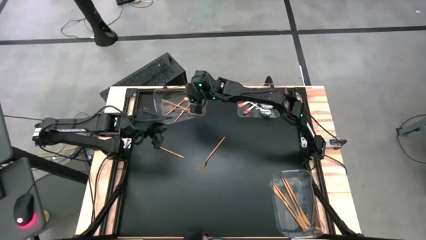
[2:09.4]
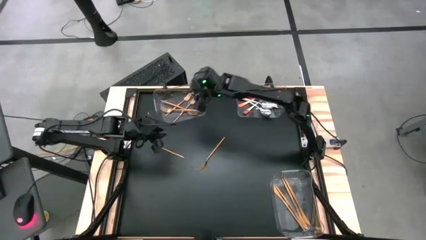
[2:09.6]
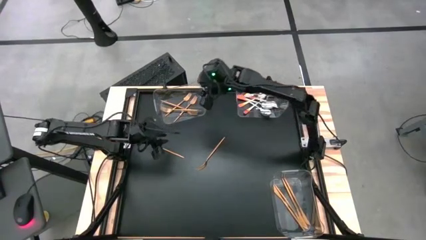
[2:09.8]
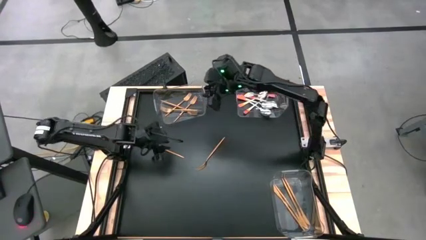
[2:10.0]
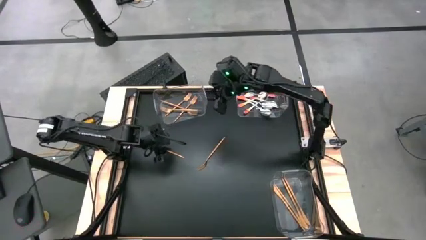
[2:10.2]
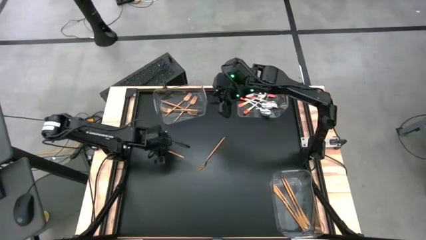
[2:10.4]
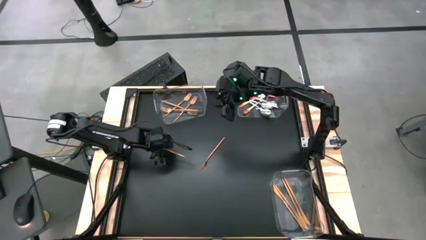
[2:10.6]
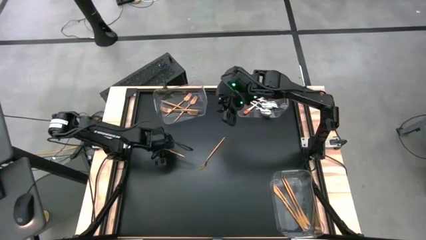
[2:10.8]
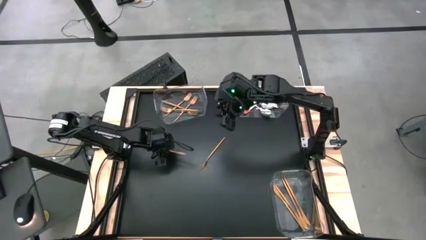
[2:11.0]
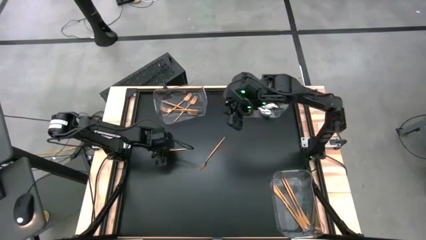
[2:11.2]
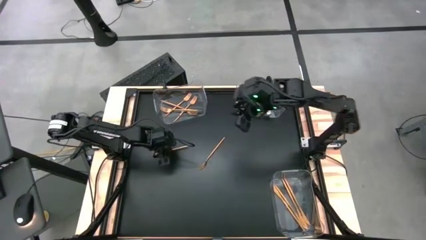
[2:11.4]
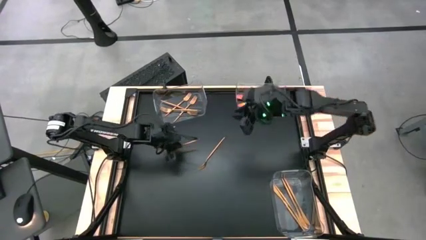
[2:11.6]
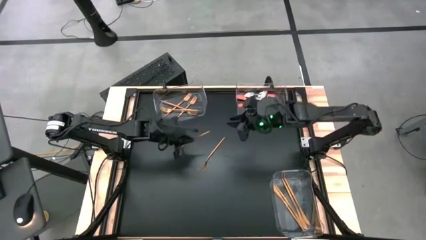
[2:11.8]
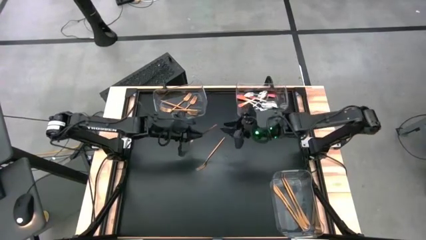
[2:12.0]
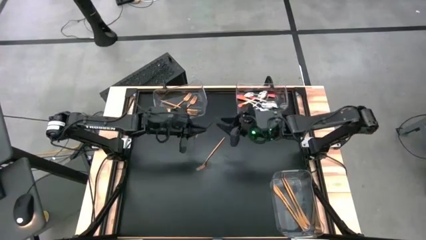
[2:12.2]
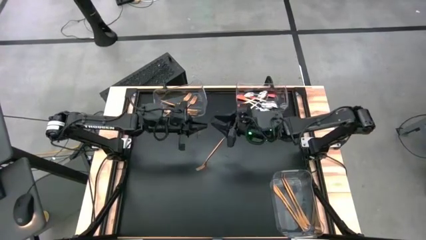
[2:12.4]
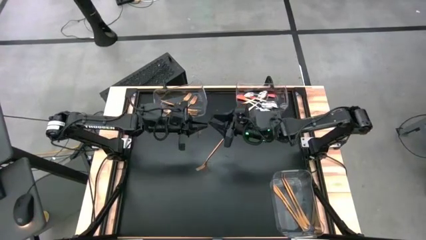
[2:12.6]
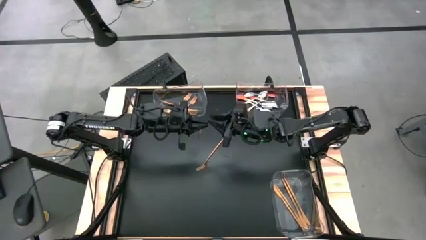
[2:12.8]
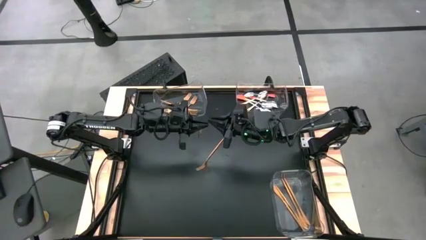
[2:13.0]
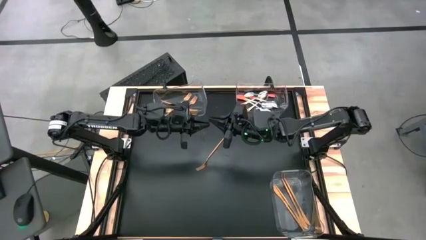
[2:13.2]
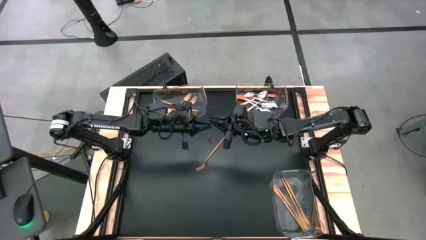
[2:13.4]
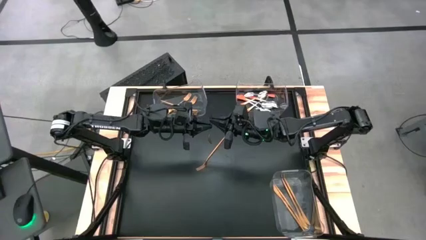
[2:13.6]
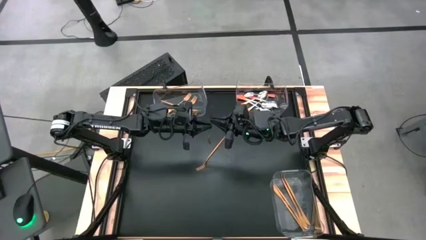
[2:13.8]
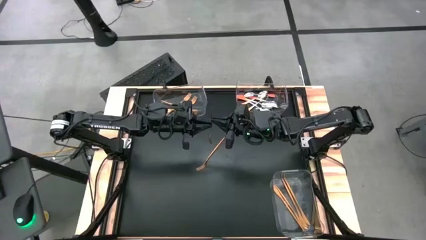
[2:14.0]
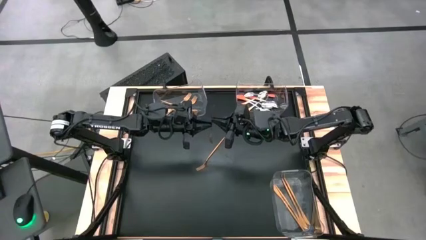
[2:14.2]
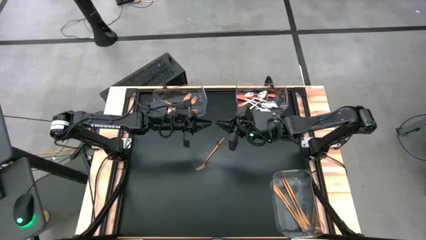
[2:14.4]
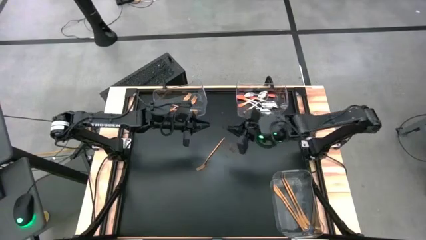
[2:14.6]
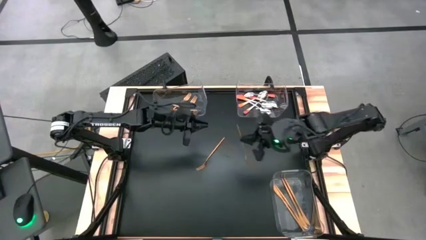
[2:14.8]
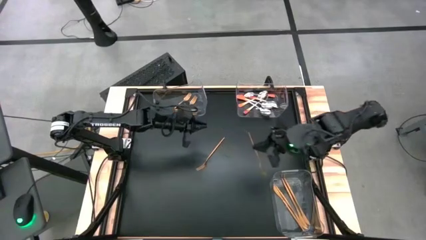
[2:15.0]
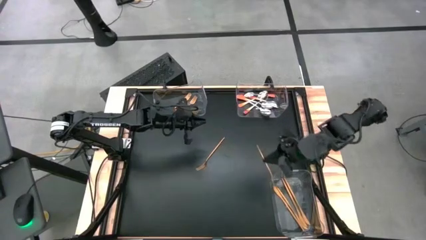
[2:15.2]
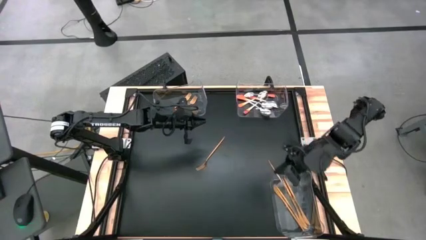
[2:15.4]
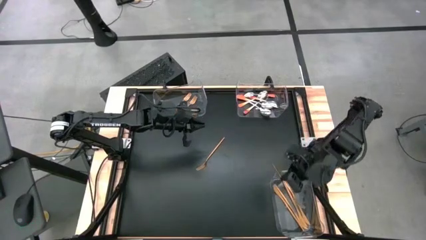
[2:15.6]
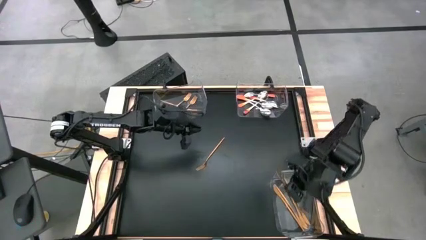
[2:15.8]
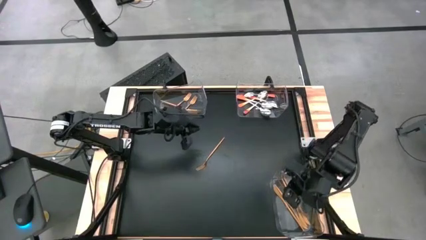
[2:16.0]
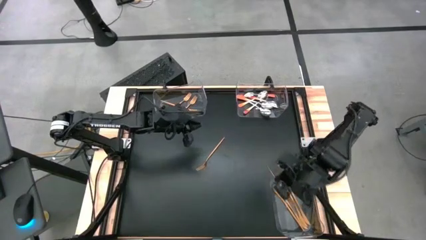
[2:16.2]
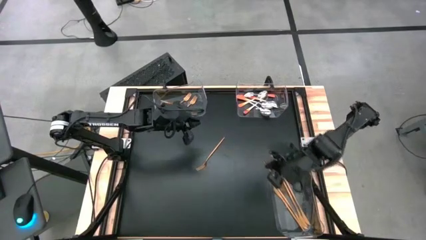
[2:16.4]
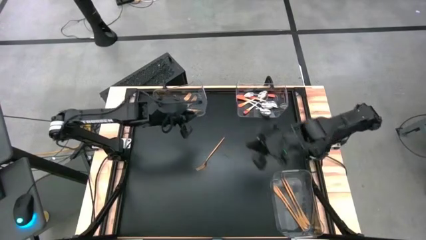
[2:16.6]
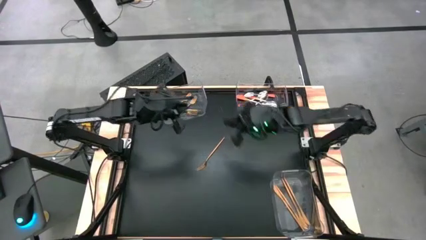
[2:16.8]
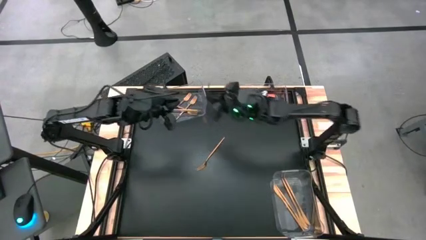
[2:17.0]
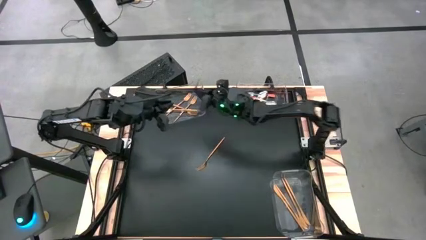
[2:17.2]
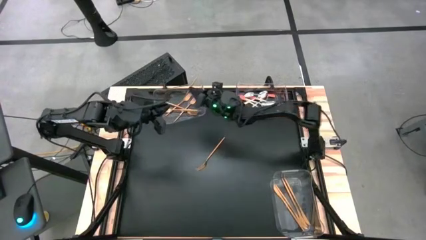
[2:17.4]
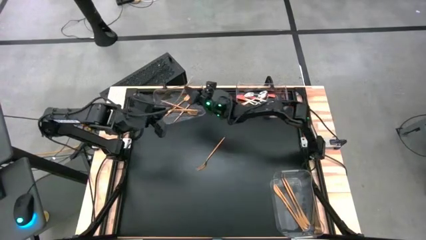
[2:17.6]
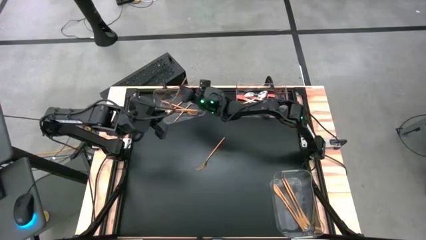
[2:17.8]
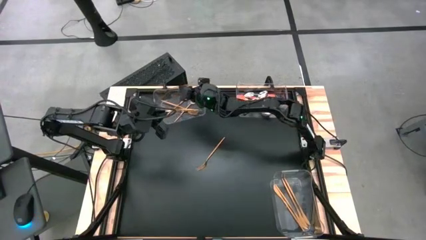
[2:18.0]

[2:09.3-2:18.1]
Task: Sort silverware by color (type)
Put the gold fork into the top left transparent bin

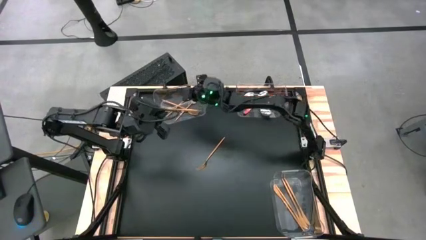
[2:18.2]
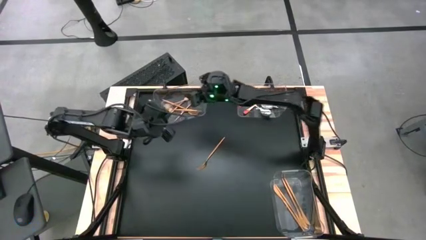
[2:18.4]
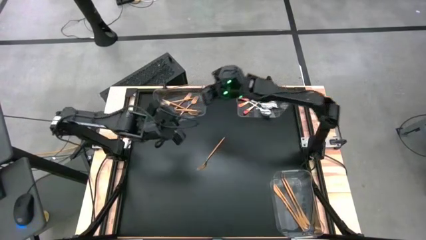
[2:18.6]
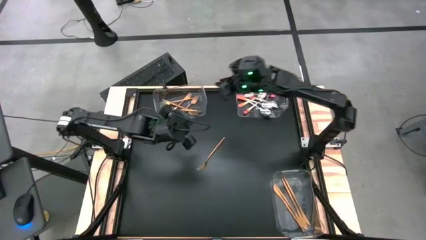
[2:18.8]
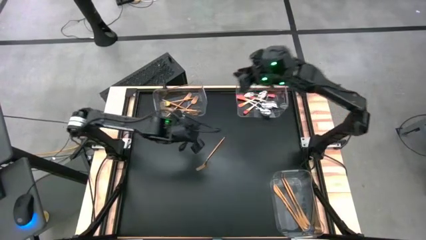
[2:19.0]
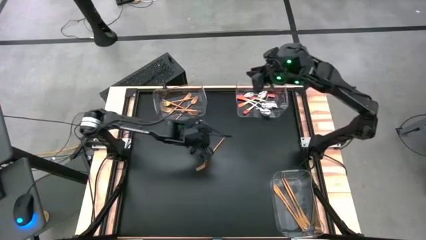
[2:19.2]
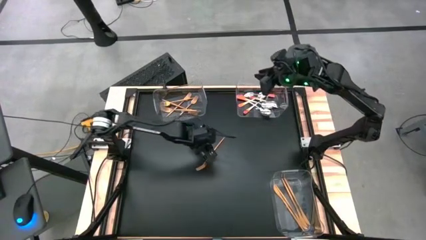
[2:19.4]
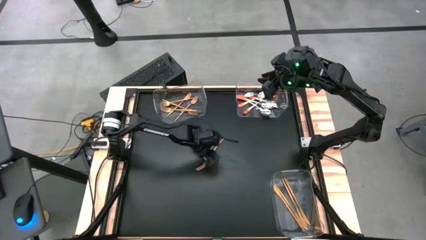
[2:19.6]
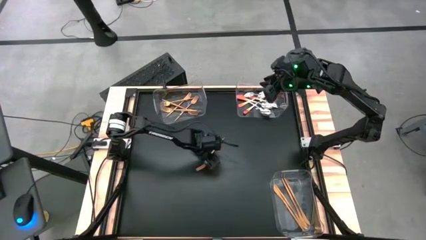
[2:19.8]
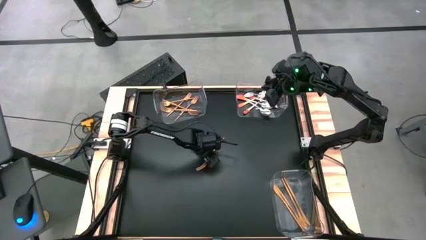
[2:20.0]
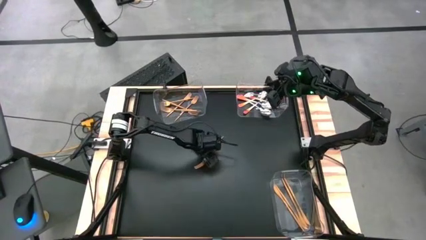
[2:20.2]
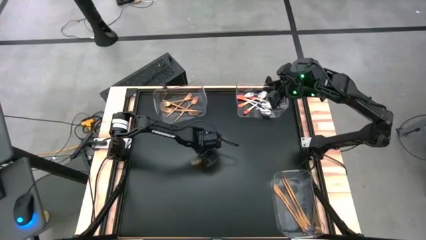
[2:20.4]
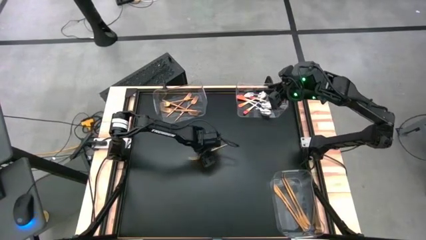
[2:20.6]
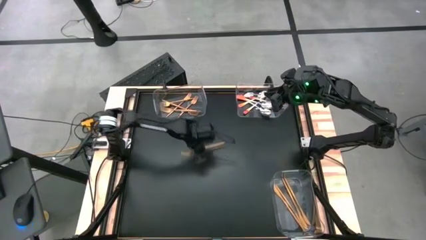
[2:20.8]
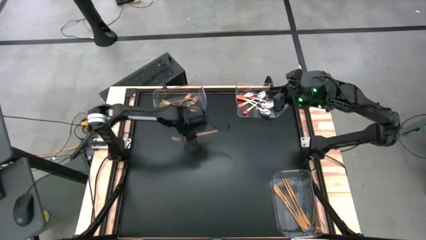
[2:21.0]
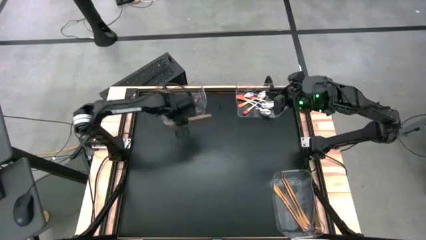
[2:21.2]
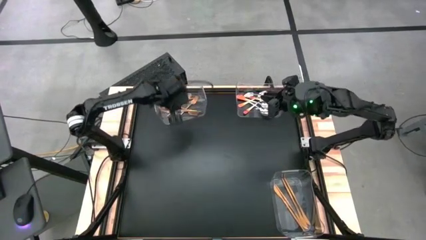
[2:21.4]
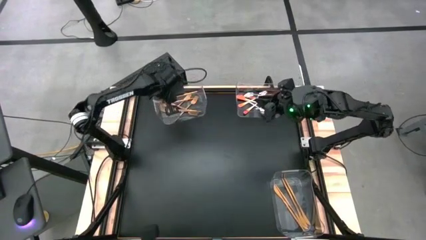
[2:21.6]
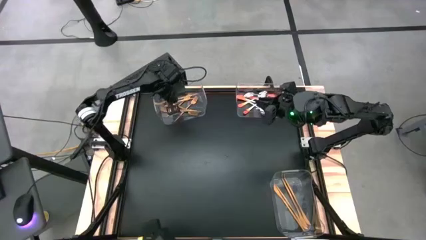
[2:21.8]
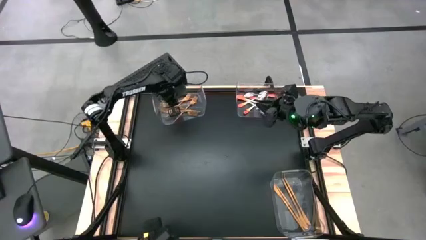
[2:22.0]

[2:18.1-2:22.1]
Put the gold fork into the top left transparent bin

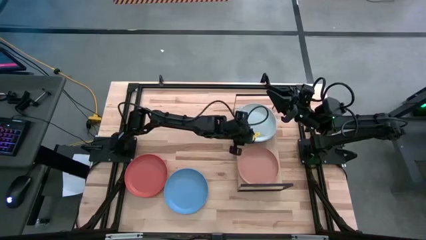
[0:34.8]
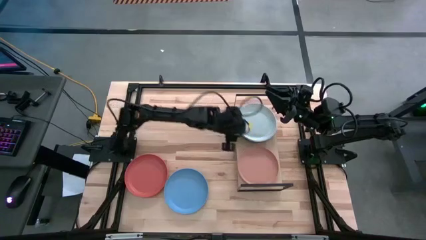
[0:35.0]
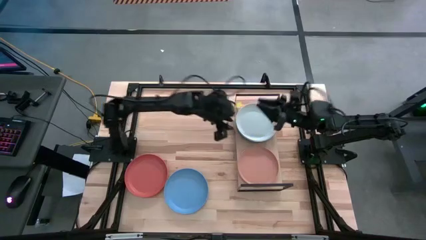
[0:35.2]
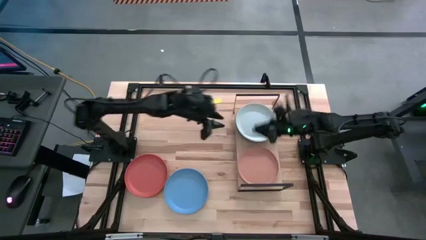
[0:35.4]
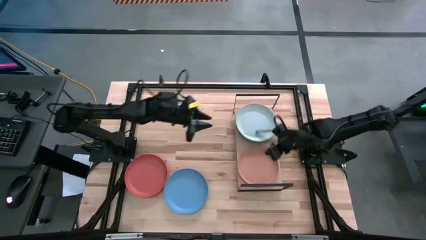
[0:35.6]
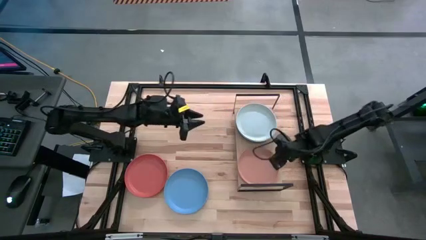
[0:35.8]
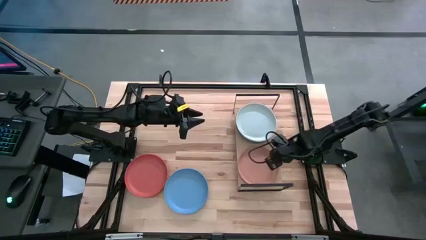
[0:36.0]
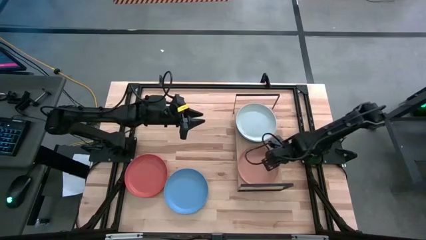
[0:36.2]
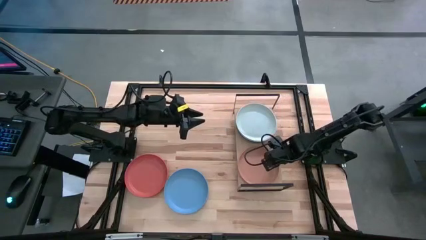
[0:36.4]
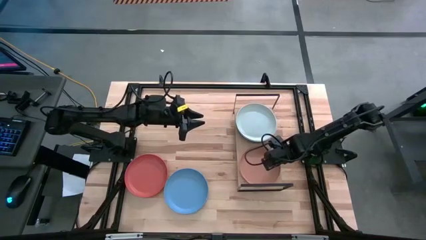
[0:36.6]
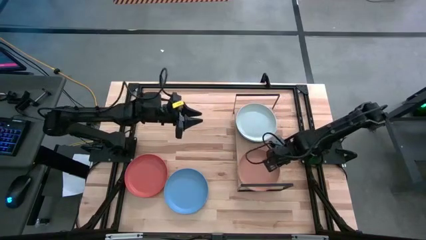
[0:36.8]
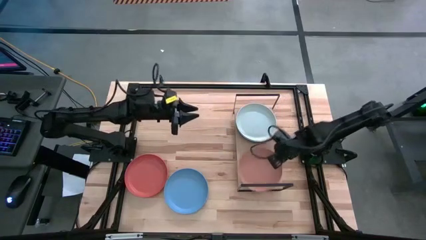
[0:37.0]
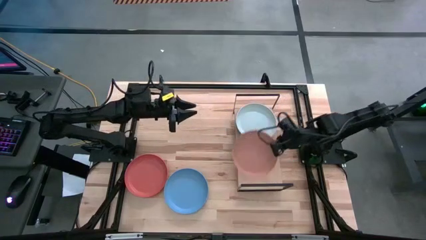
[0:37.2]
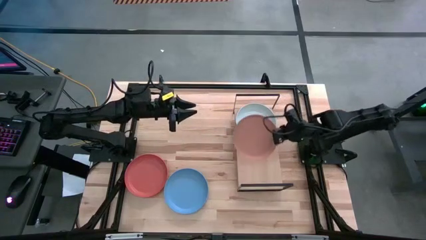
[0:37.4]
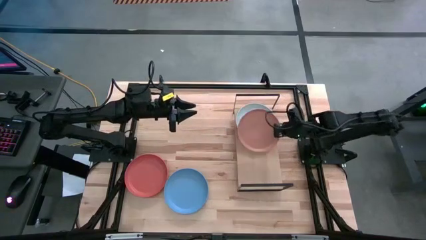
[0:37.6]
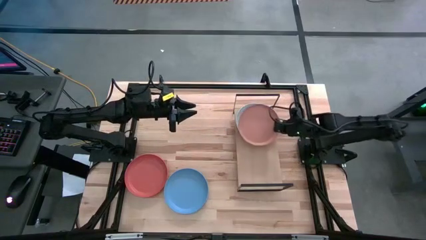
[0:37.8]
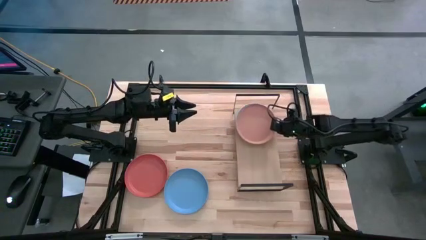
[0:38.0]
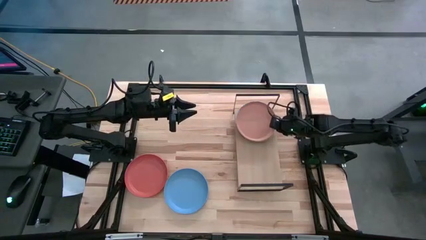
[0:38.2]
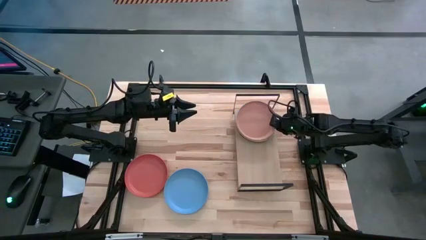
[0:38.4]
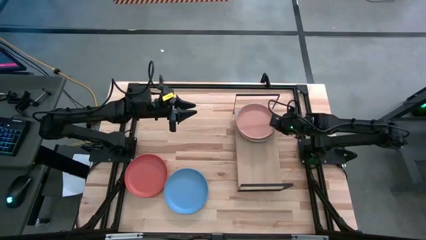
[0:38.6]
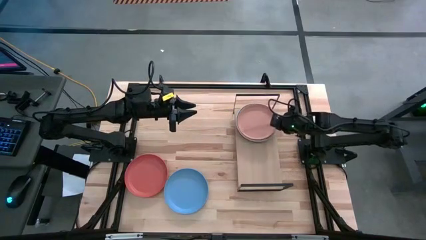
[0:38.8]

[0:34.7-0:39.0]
Task: Place and stack plates onto a shelf
Stack the brown plate on top of the gray plate on the shelf
